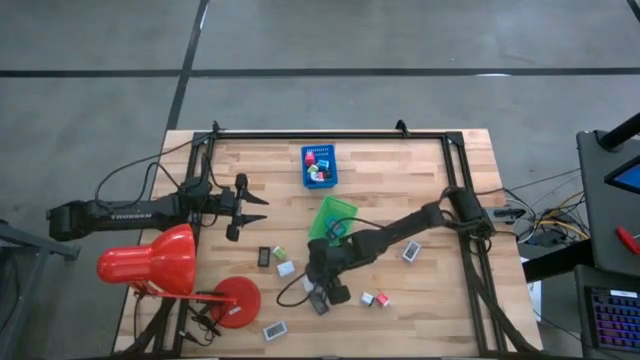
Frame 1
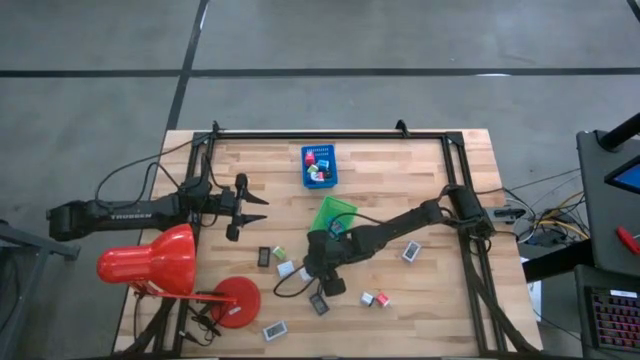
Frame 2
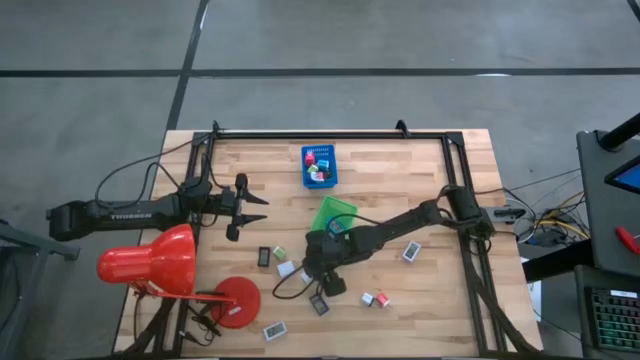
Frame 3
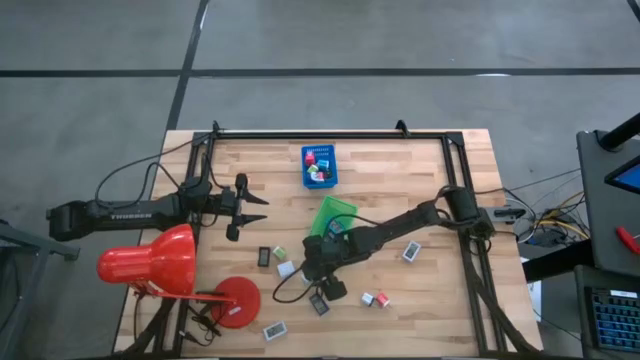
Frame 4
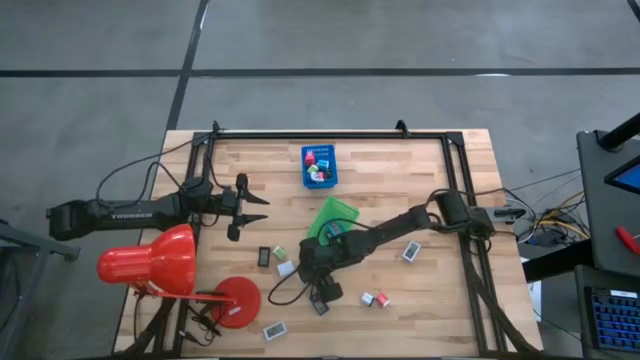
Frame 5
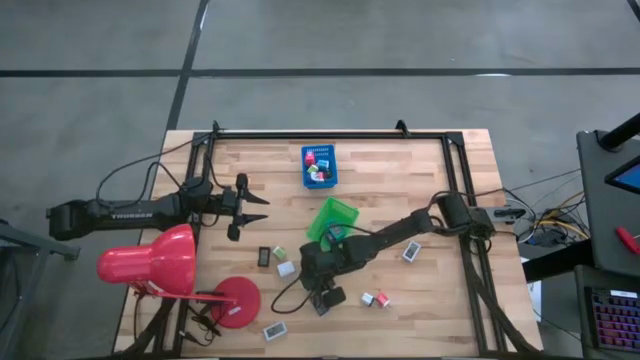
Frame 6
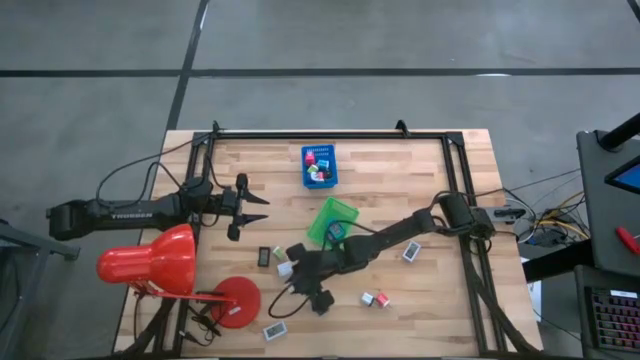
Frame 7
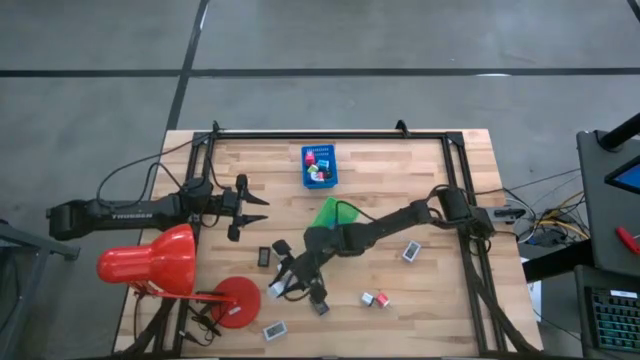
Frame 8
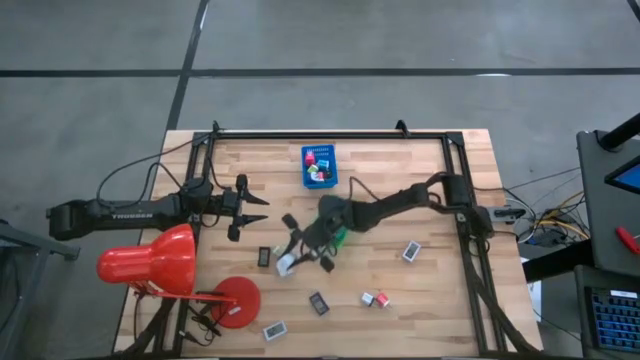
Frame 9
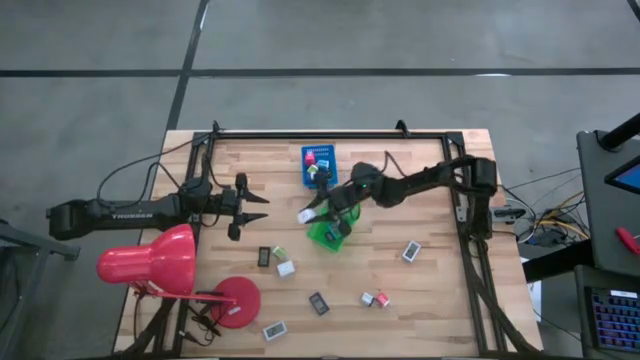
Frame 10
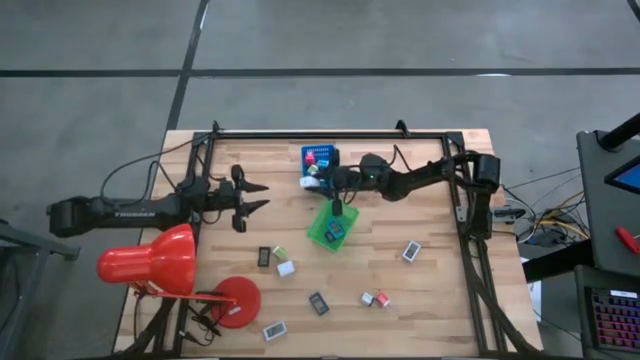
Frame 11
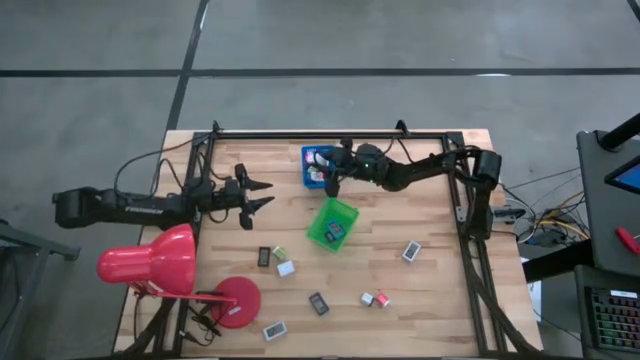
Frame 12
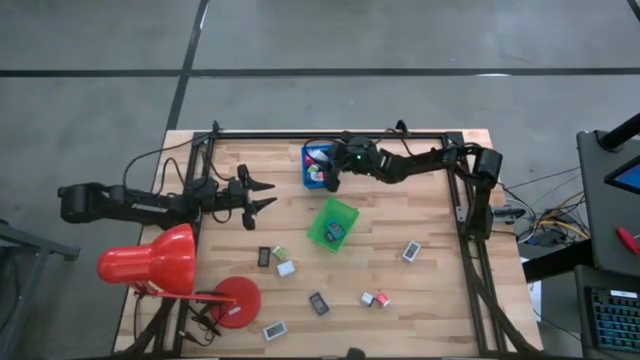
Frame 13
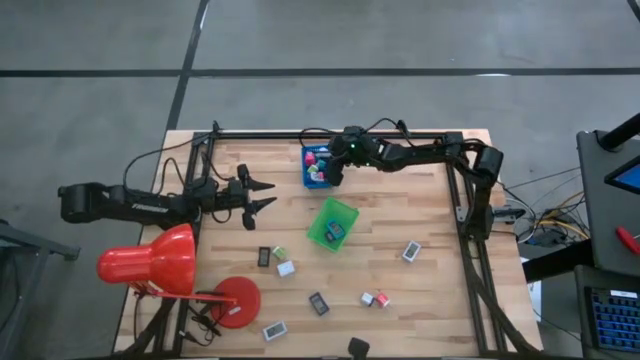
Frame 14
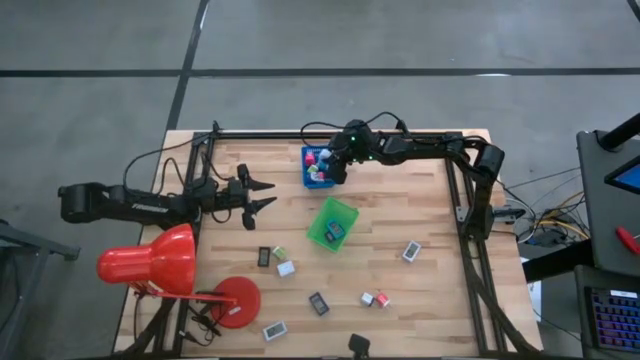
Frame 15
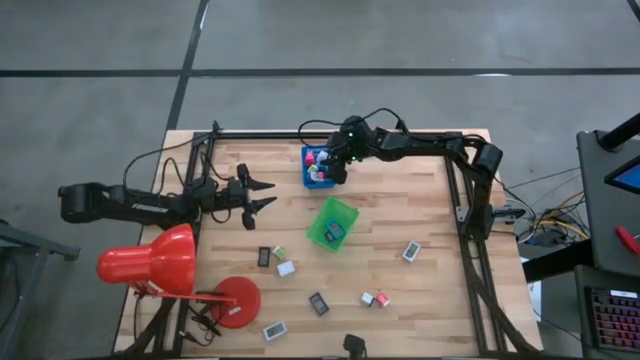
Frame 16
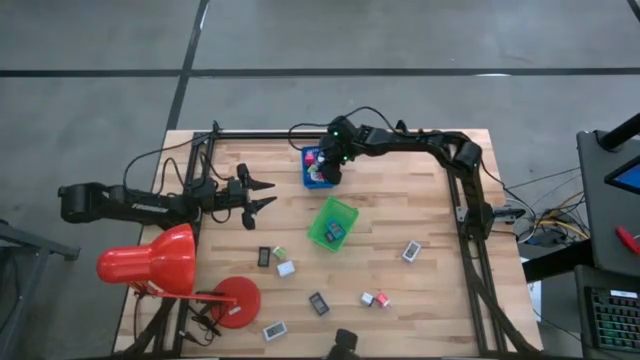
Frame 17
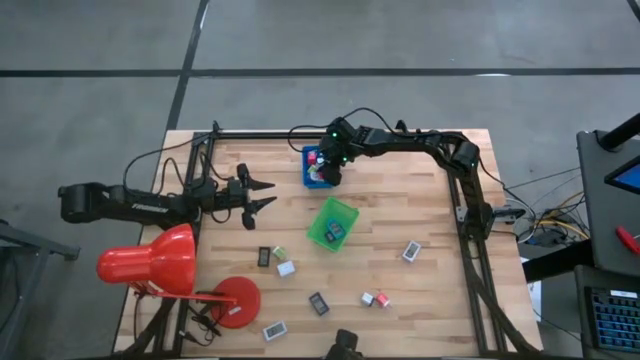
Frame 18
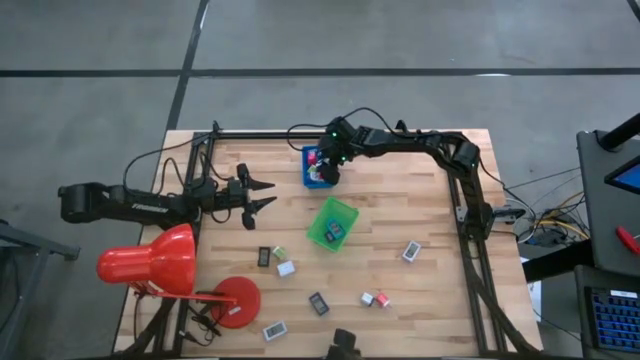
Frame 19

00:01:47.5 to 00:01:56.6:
Task: Pick & Place Office items
Put the right big white charger adapter into the blue bin

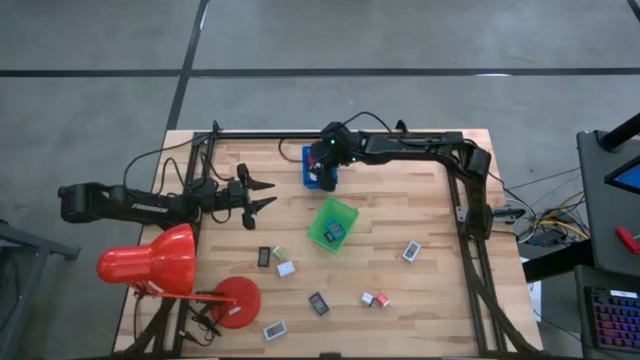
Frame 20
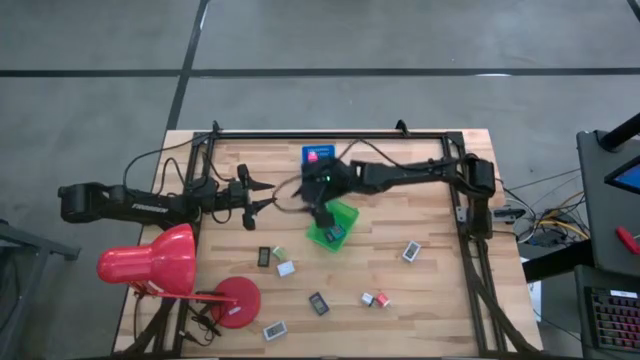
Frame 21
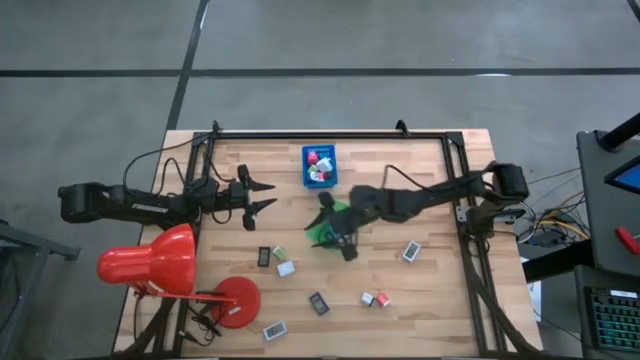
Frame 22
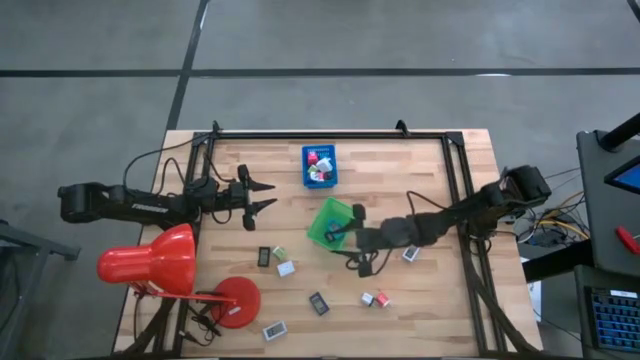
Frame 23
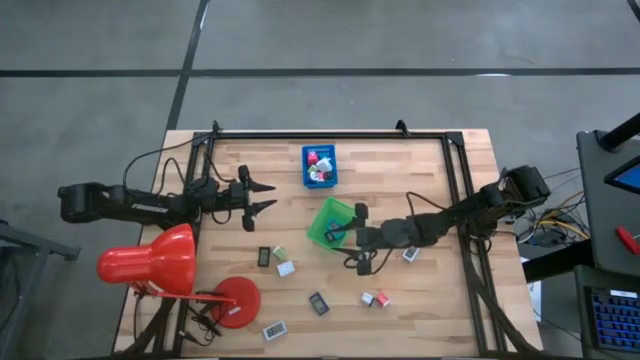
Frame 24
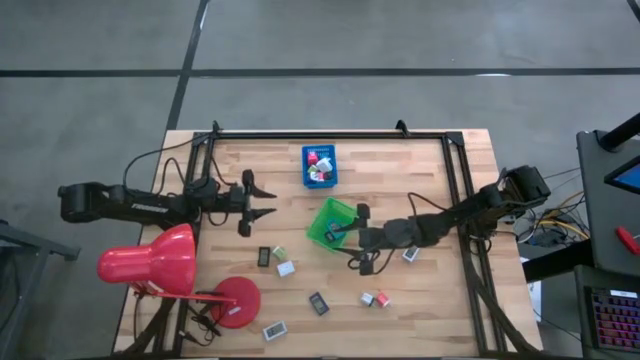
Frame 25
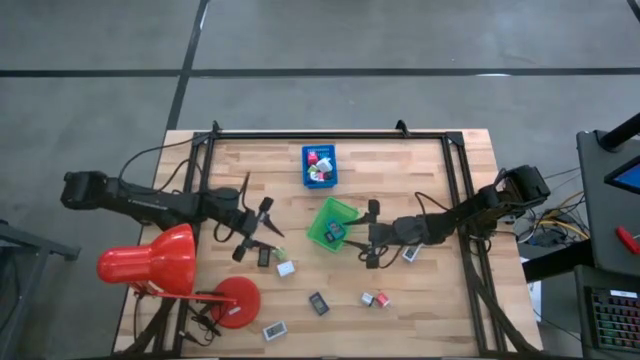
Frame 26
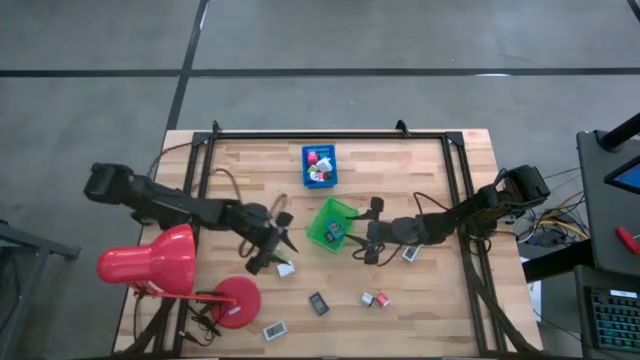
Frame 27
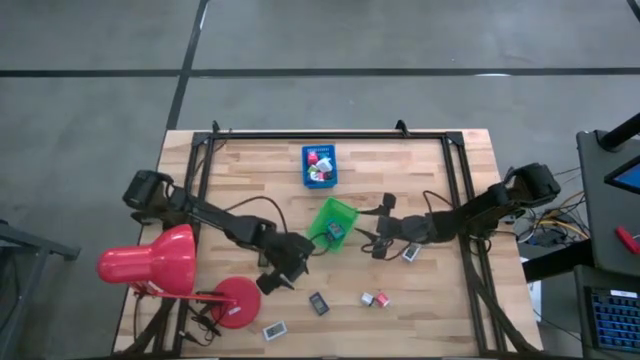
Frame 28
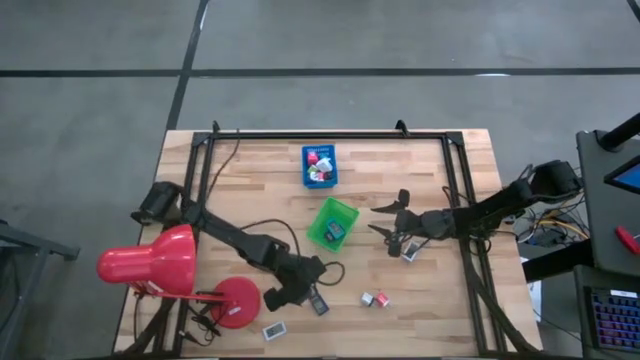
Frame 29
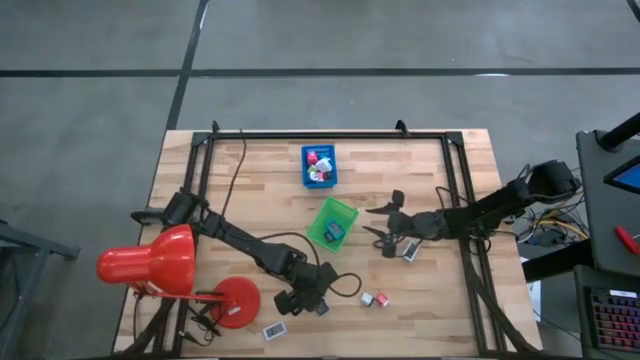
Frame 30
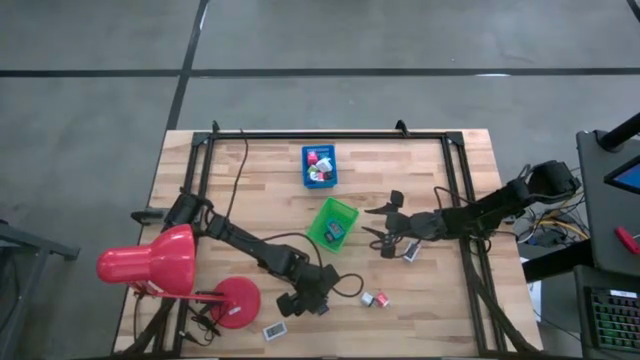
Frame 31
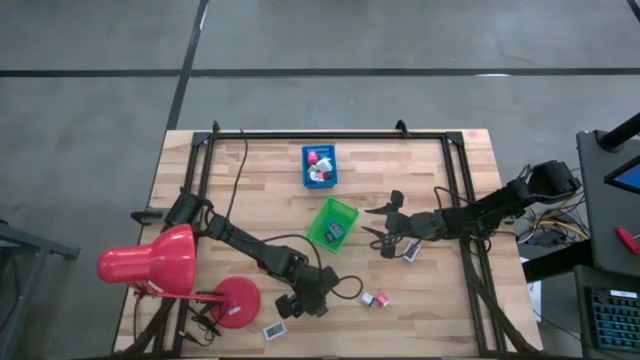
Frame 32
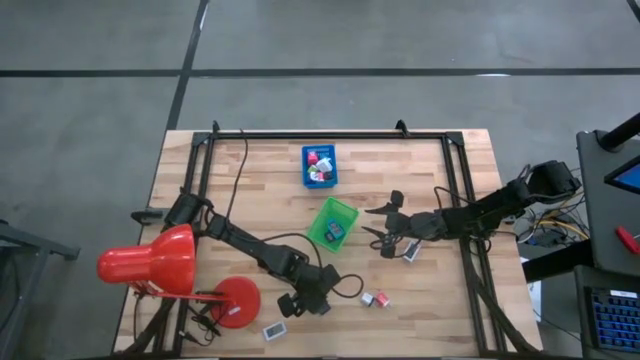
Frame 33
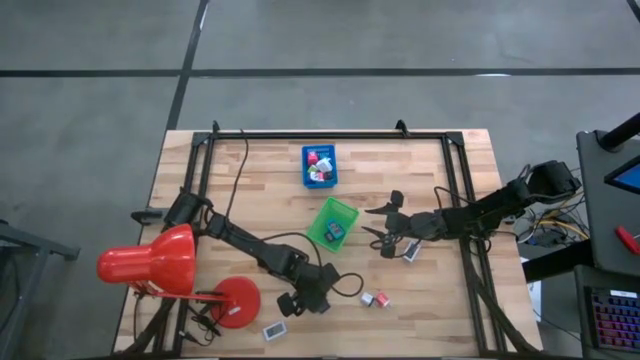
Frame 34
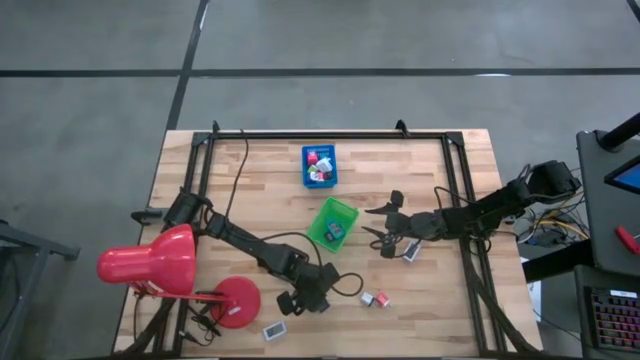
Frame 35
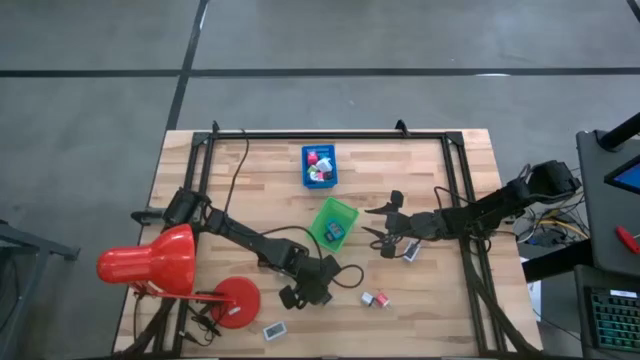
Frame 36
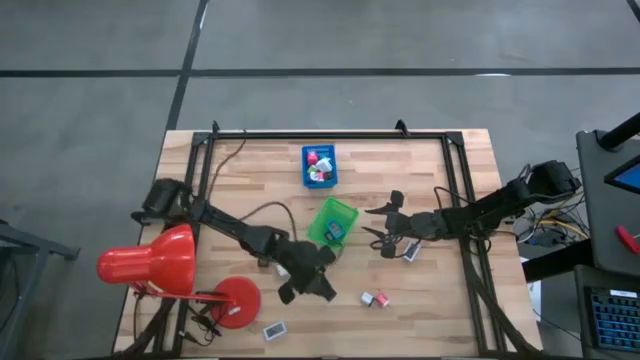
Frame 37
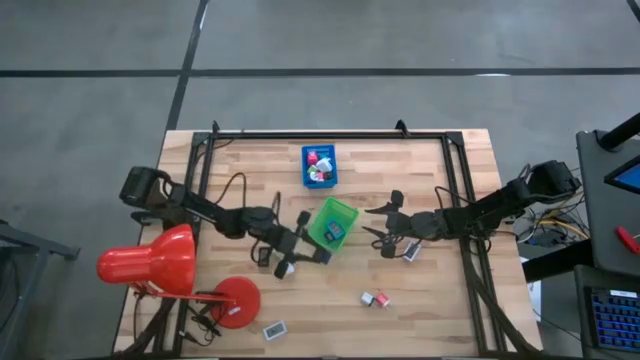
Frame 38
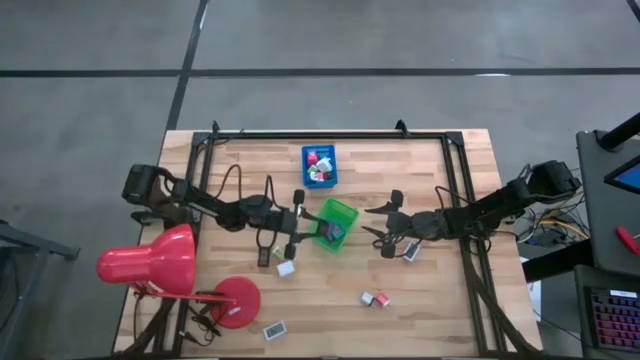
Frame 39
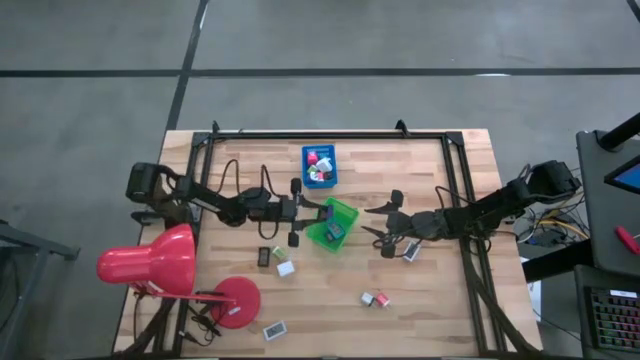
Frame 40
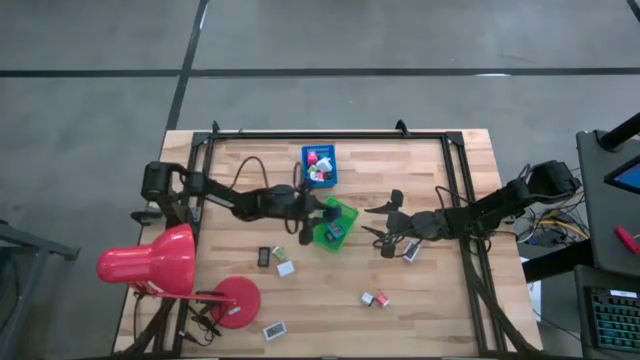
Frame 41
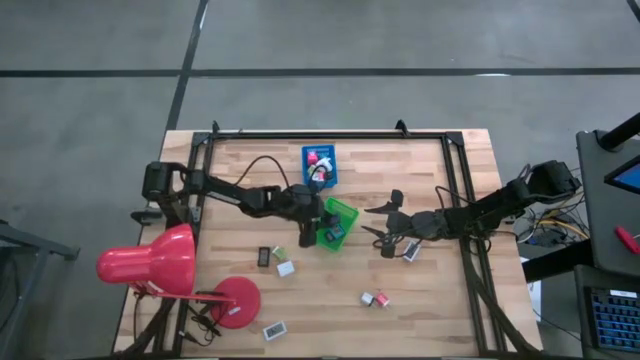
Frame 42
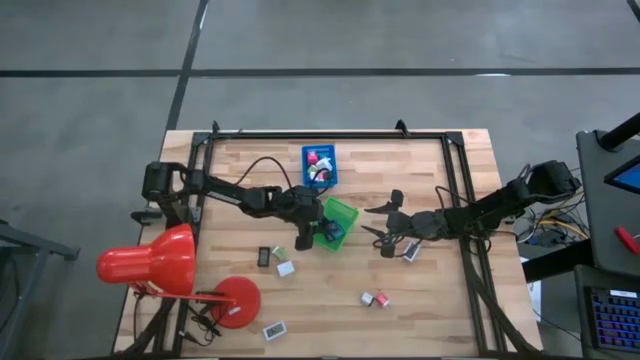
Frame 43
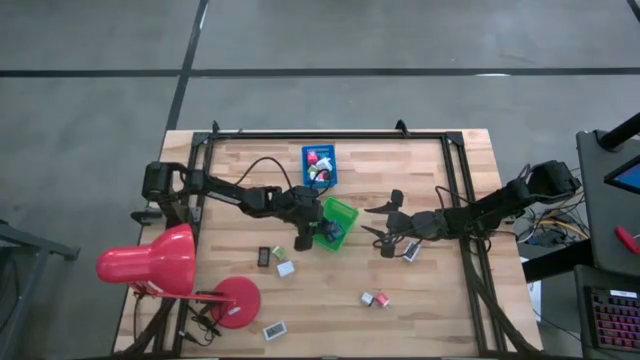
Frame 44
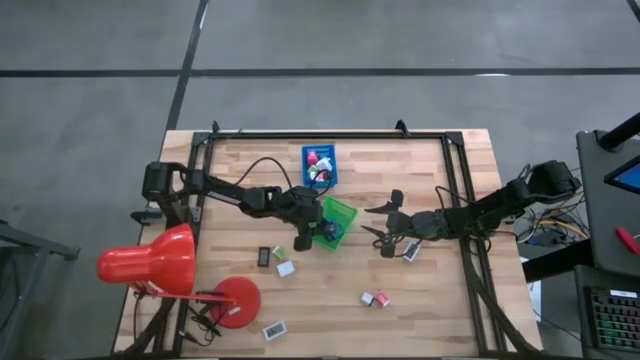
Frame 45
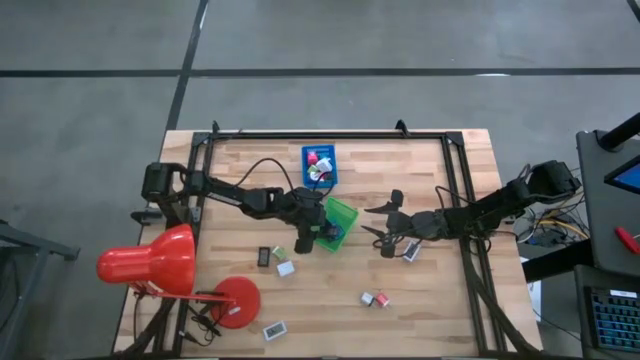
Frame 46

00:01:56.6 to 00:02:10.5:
Put the blue digital clock into the green bin
